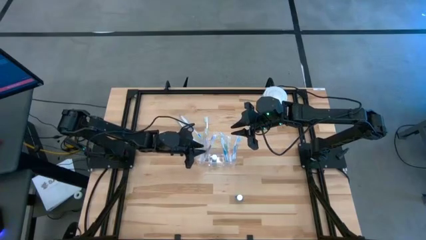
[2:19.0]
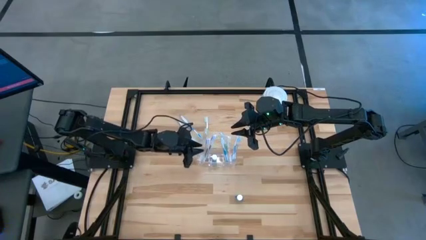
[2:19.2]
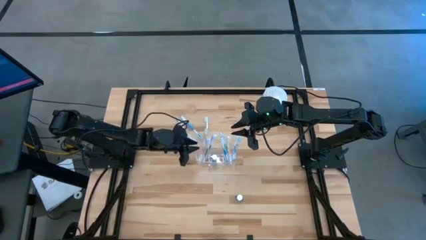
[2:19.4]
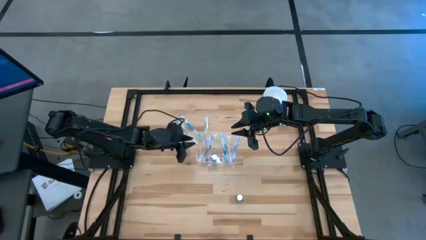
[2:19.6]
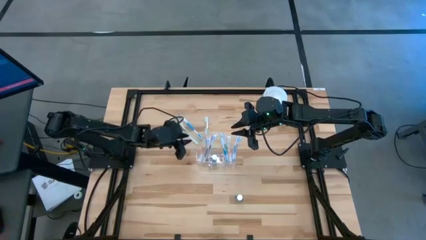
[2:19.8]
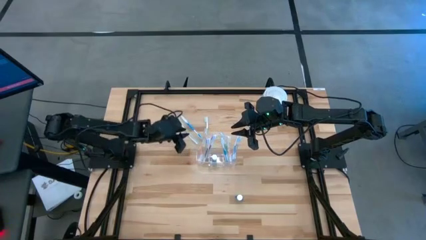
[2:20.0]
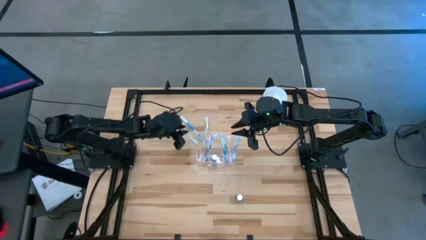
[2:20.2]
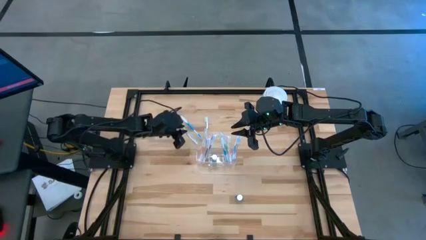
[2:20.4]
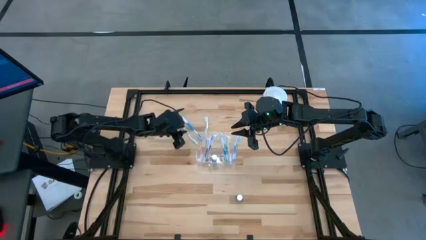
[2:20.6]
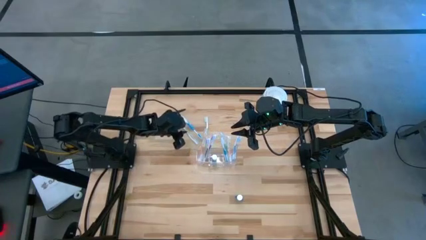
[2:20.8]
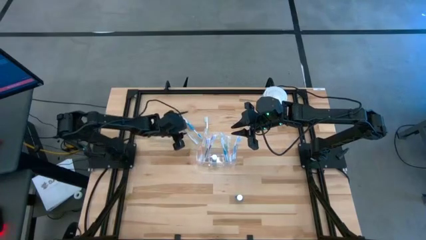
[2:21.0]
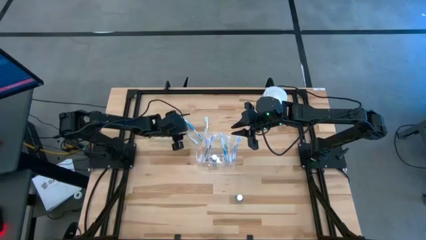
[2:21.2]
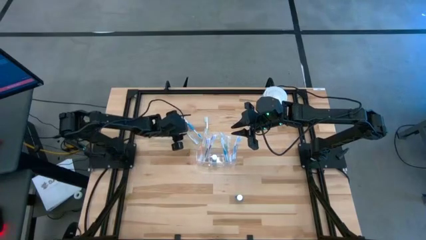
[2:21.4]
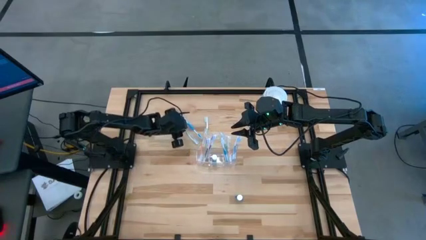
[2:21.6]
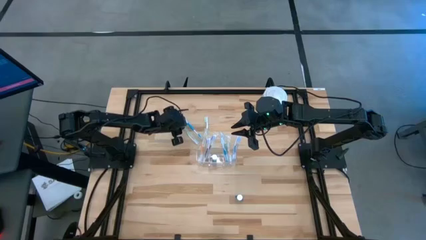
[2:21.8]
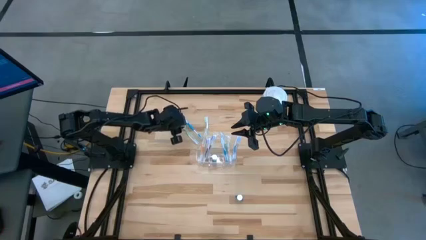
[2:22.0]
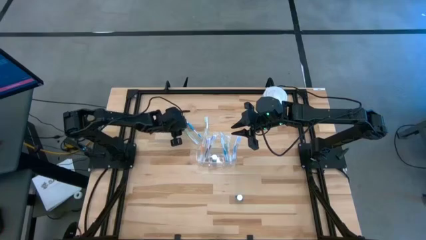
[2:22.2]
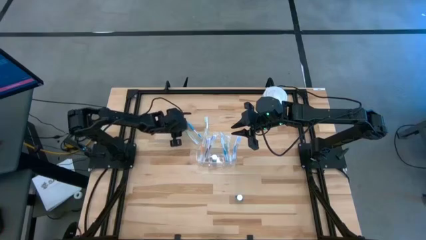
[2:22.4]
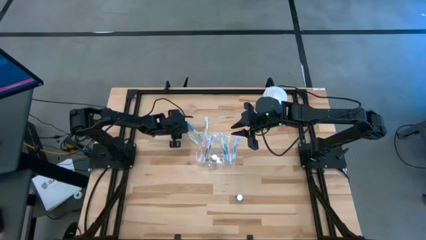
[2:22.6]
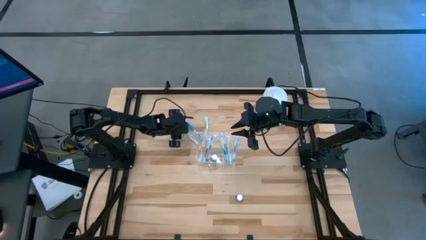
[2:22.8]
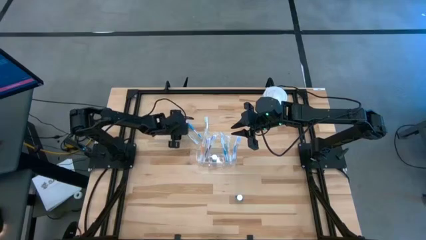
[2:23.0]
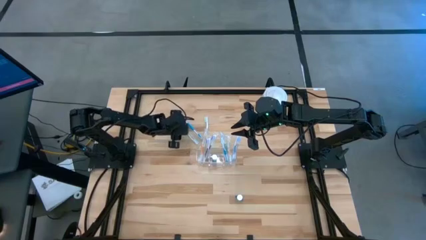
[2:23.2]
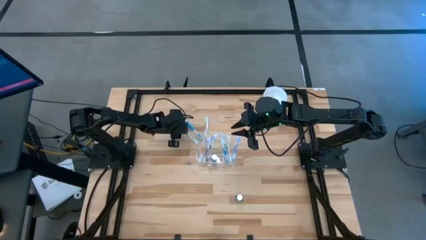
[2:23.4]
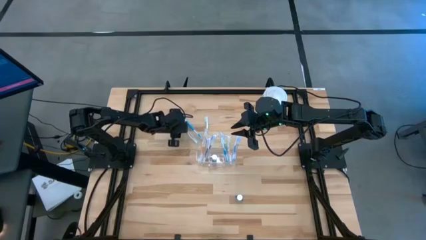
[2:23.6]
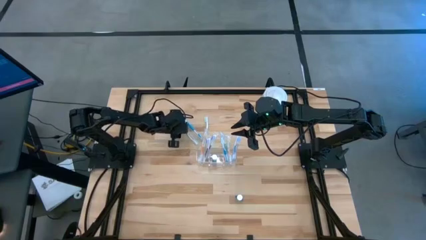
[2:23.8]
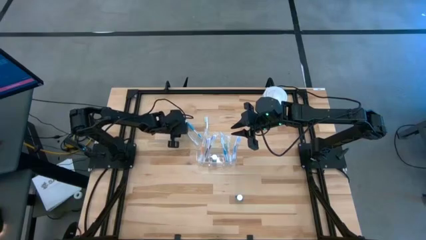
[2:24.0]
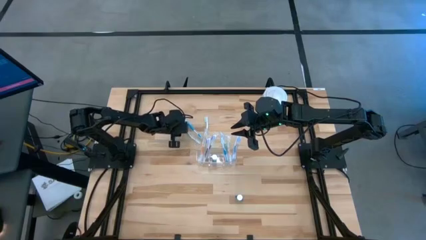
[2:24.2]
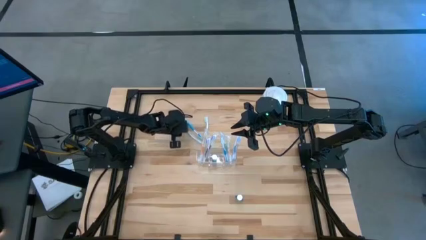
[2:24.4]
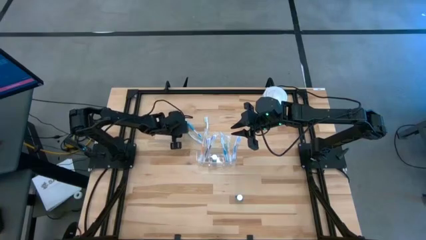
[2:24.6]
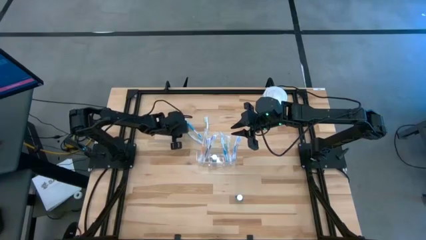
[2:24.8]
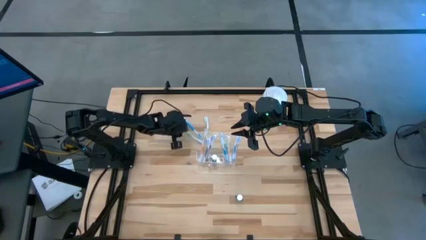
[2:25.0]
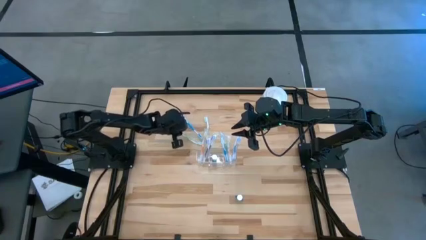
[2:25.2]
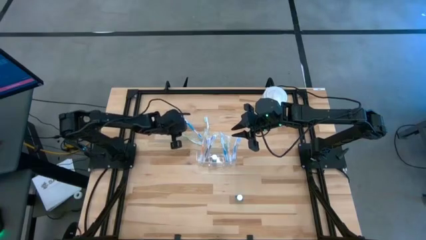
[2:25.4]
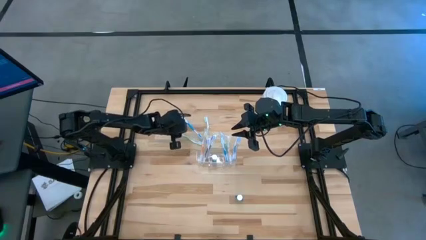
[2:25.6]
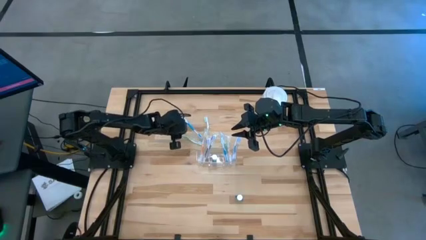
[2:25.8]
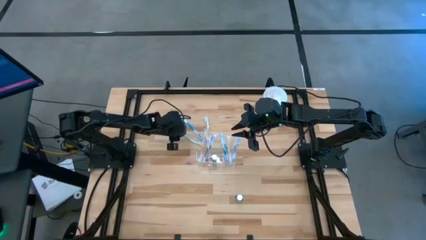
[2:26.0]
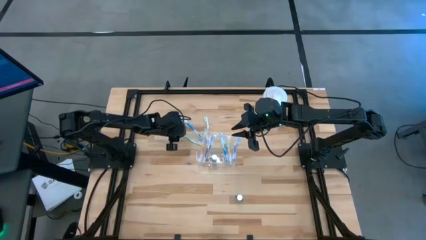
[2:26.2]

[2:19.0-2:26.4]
Task: Pick & Place toothbrushing station
Put the left green toothbrush into the transparent organizer

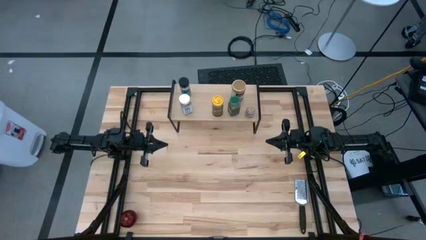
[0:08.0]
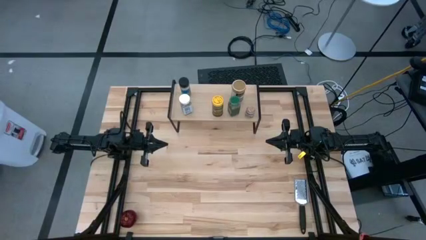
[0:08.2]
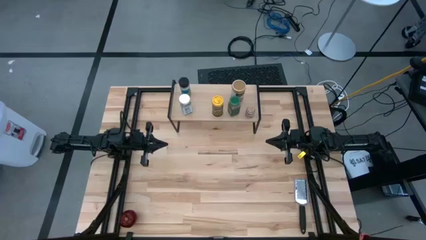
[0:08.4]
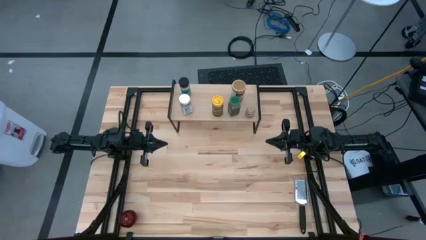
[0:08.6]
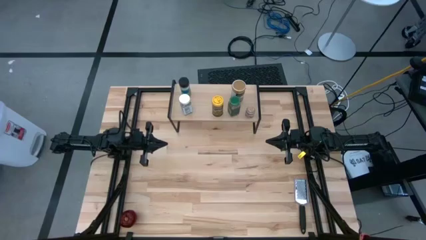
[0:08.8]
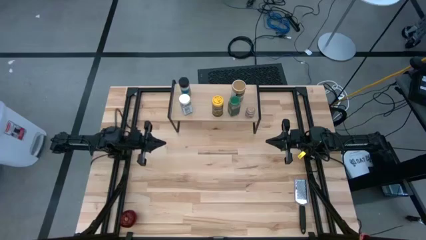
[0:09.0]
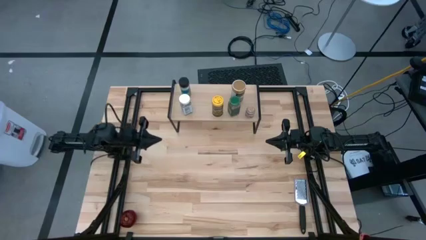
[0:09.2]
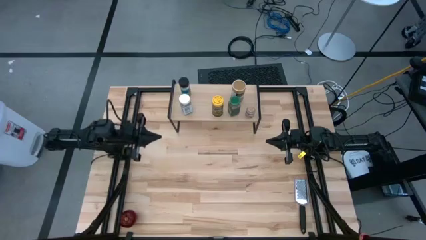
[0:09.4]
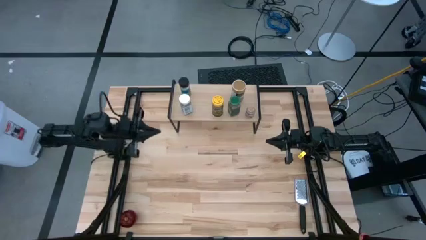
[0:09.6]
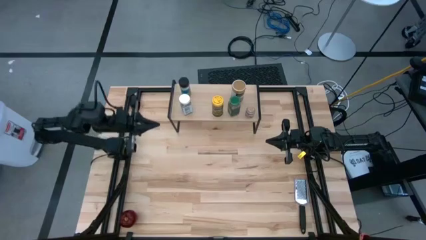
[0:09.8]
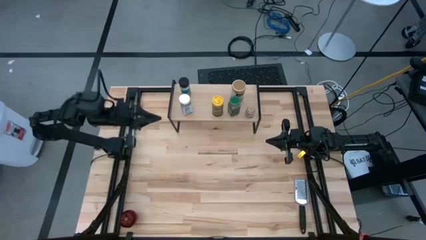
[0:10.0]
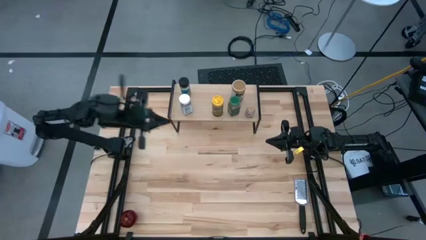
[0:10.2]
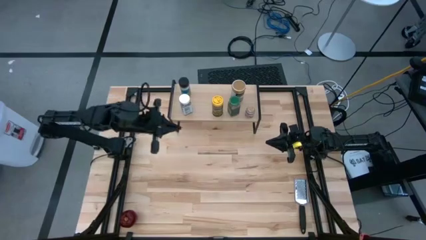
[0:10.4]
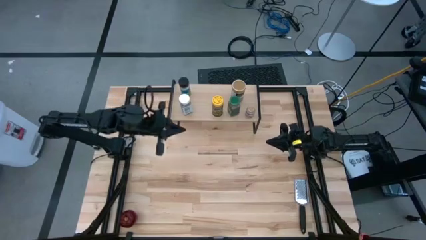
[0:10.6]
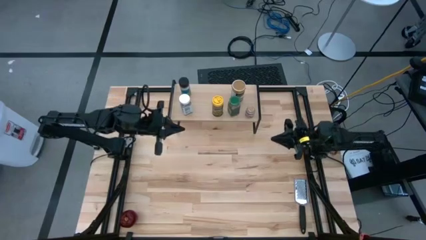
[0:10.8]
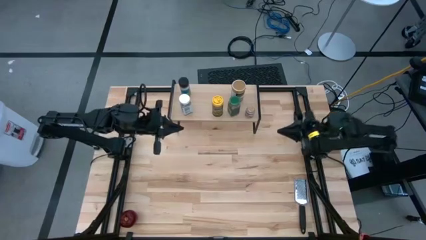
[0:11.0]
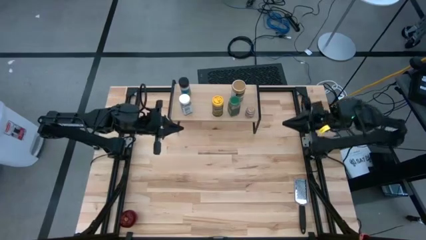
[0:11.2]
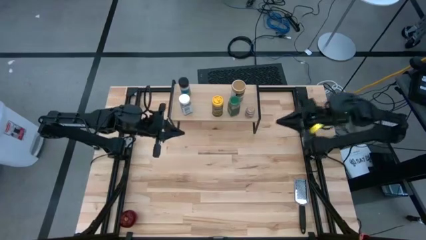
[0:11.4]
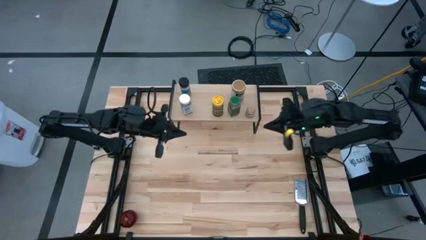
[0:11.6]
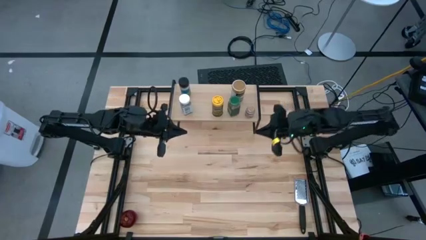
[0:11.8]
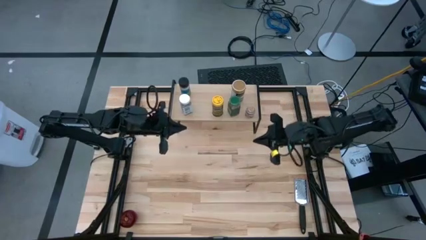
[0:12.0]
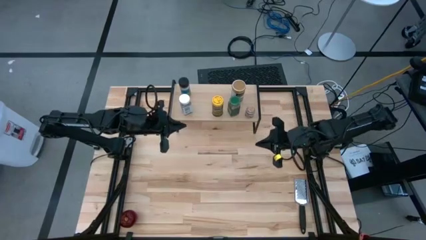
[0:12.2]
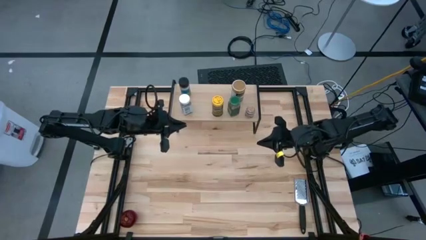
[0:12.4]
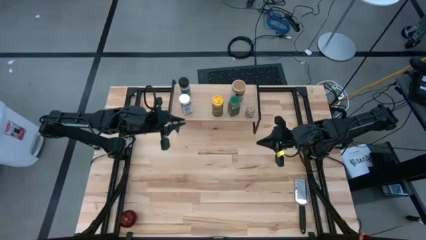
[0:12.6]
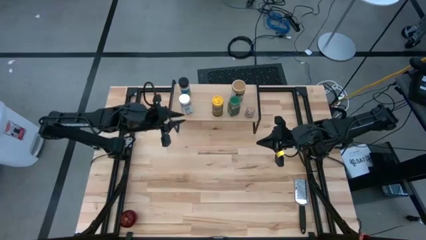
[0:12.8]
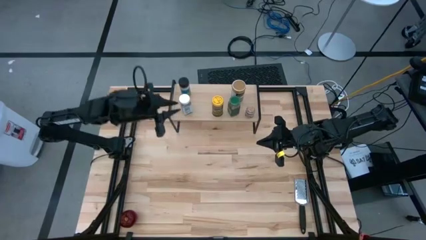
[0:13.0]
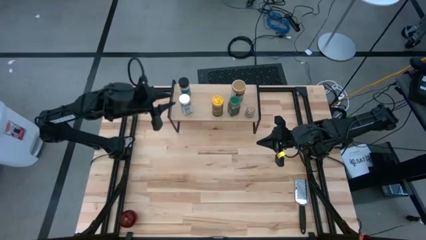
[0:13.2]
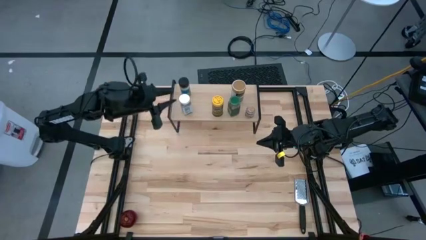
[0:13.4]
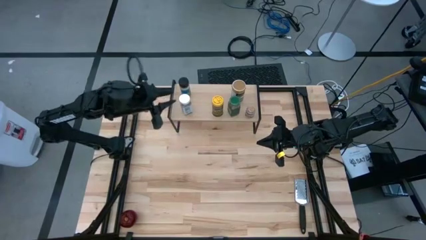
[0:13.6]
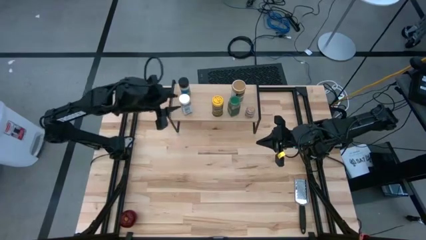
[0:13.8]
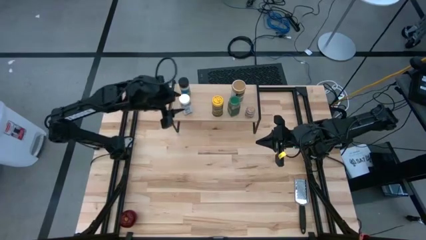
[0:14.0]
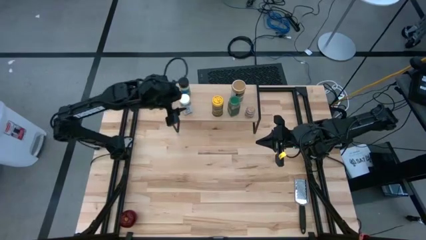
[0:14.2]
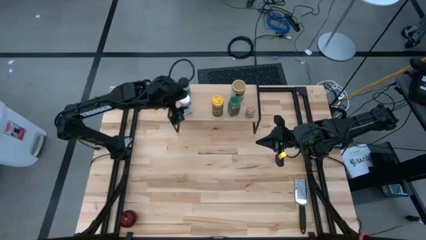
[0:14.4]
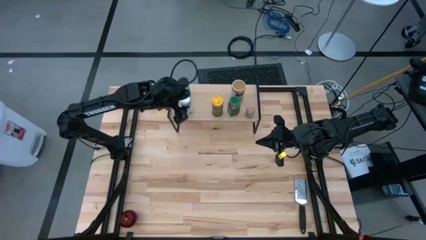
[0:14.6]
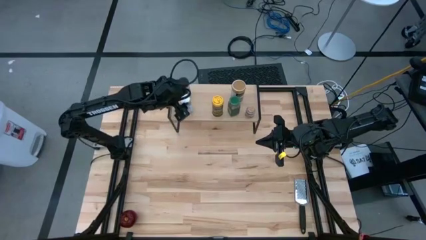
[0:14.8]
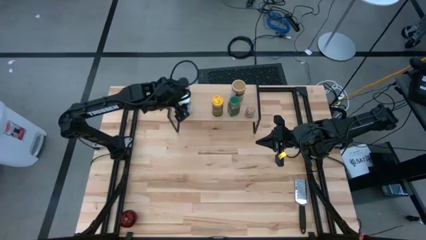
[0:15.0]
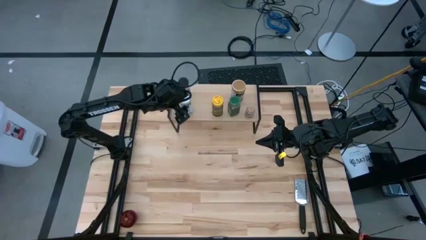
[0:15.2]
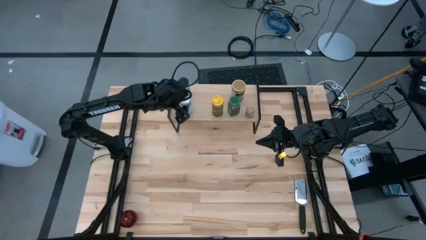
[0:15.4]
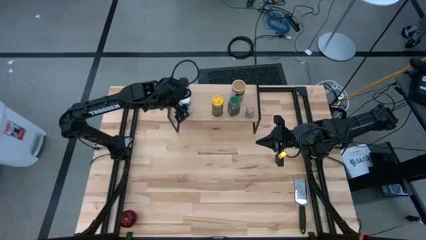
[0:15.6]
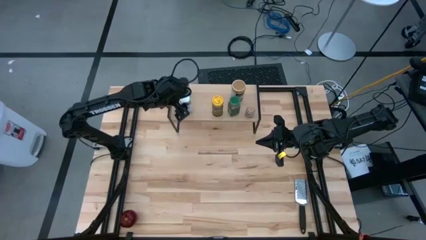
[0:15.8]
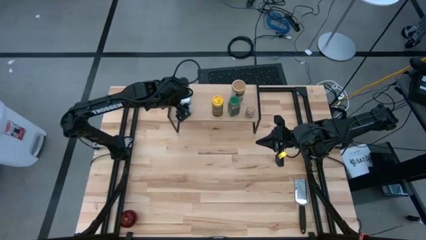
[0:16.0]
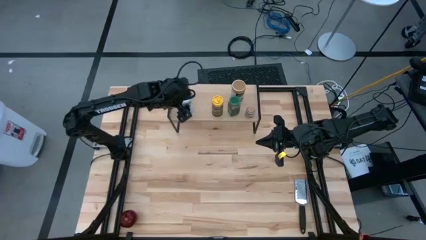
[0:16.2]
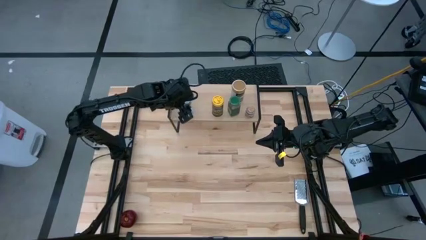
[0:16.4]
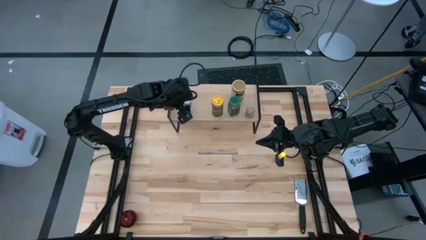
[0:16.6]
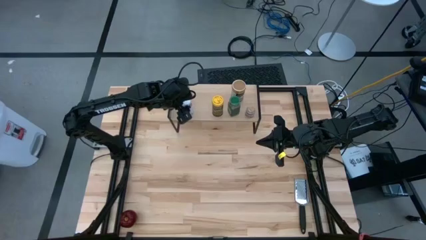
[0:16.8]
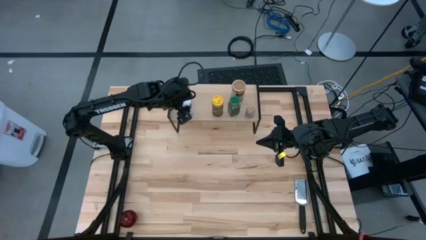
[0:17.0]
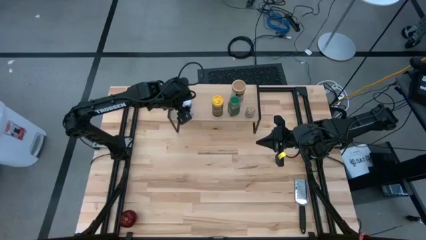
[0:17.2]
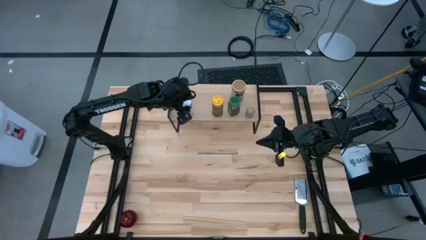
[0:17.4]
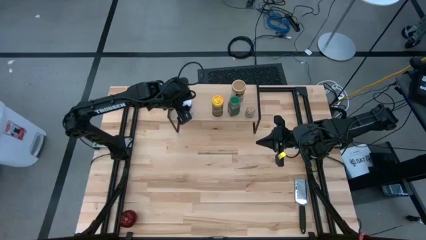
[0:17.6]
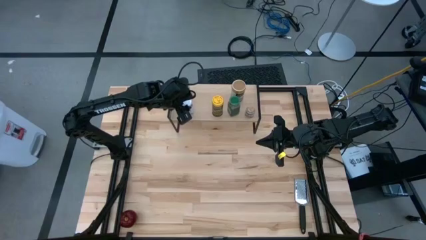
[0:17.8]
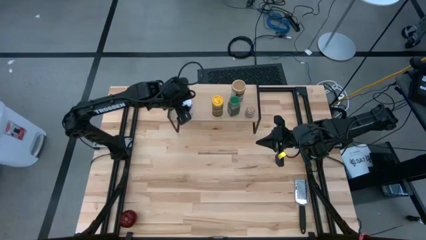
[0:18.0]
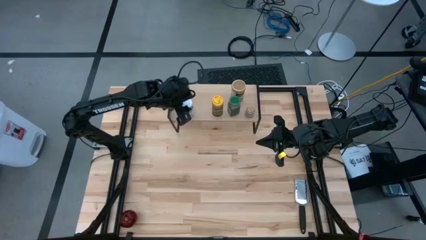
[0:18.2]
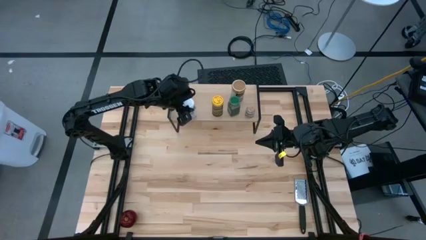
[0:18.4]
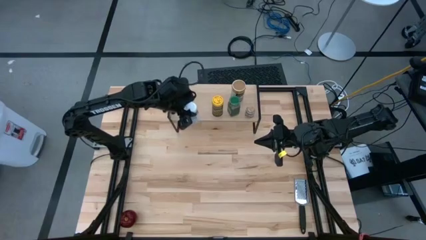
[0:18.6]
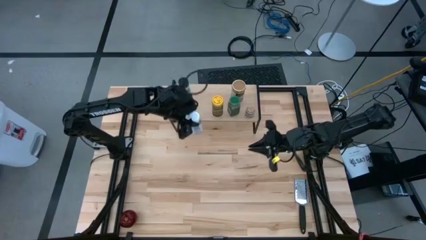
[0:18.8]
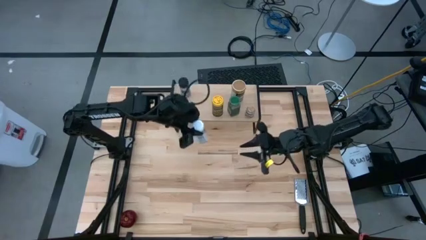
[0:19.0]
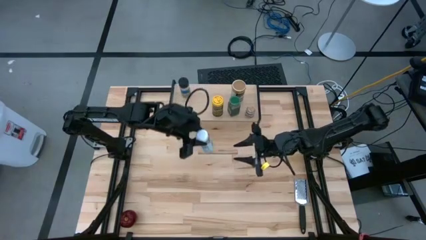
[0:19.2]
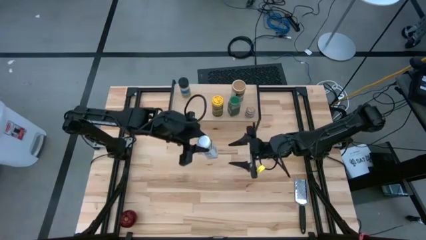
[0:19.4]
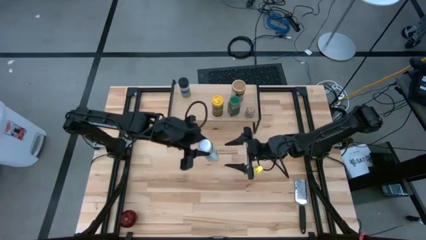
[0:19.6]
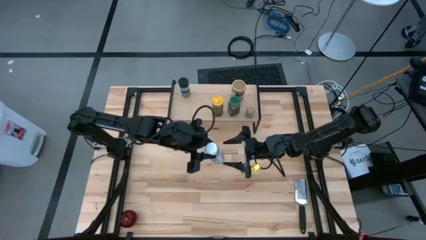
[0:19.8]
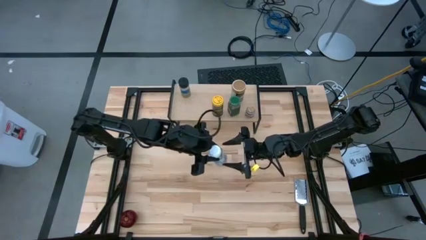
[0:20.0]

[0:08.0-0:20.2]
Task: Shelf spices
Remove the white seasoning bottle from the shelf
